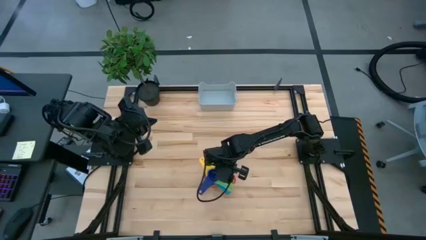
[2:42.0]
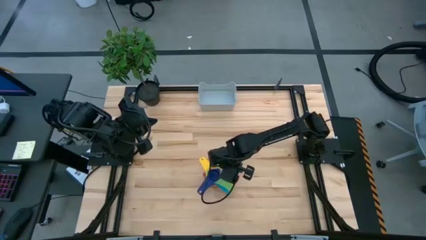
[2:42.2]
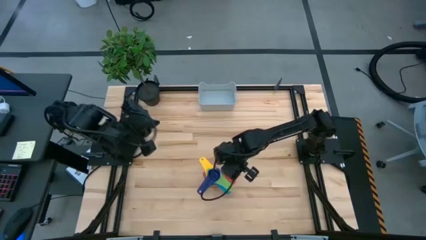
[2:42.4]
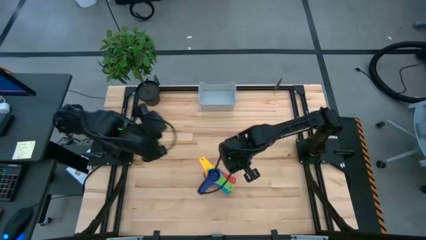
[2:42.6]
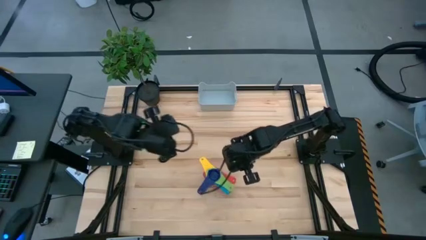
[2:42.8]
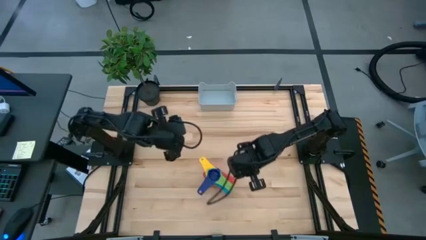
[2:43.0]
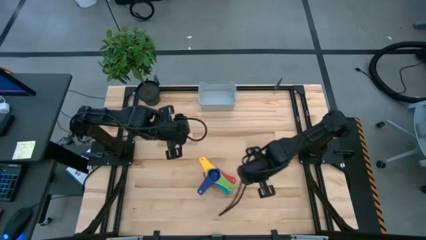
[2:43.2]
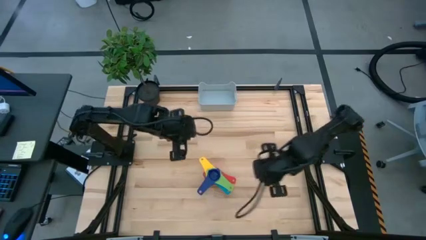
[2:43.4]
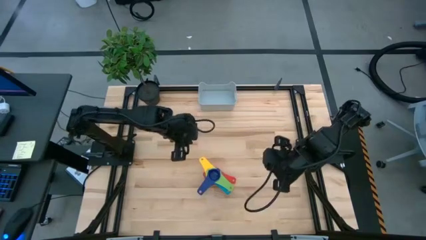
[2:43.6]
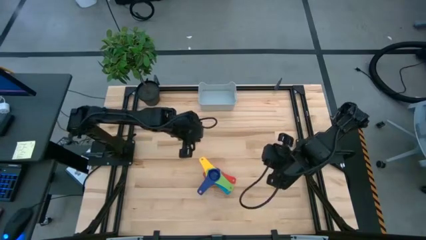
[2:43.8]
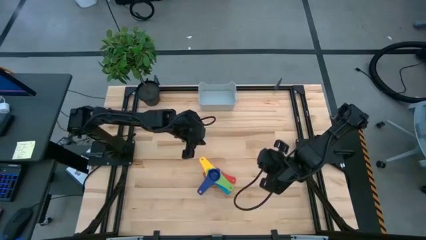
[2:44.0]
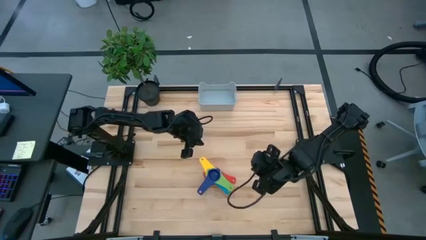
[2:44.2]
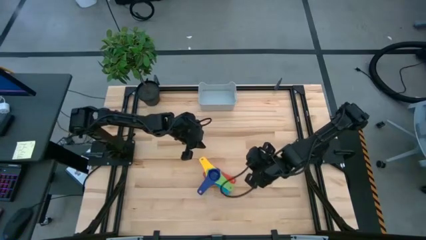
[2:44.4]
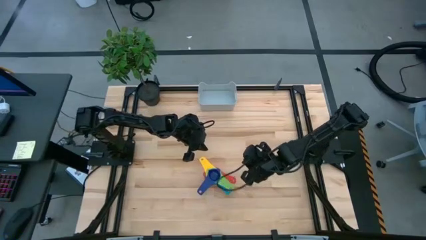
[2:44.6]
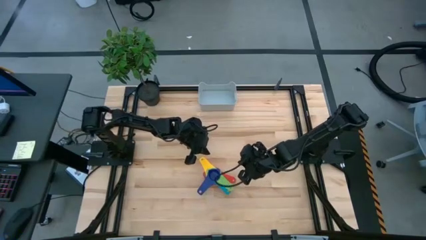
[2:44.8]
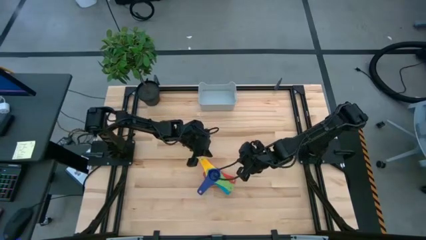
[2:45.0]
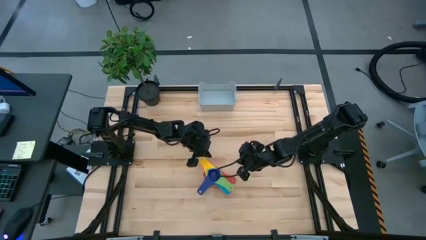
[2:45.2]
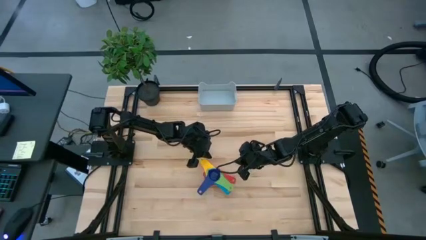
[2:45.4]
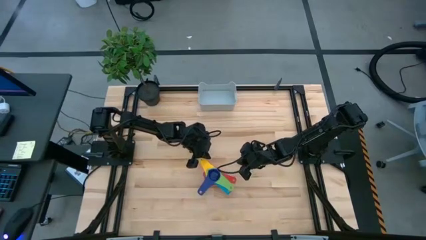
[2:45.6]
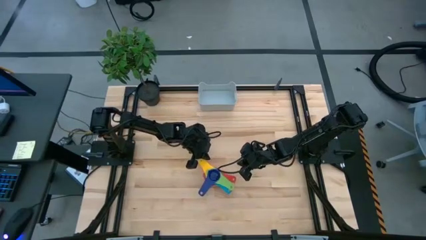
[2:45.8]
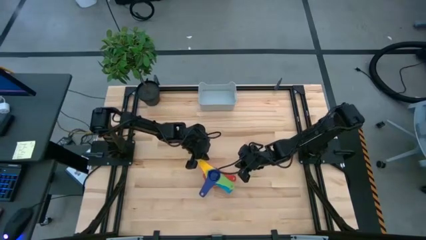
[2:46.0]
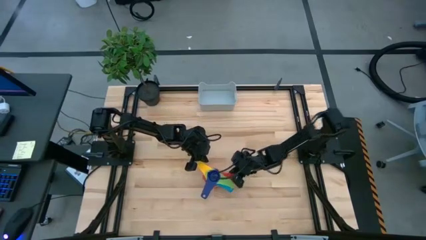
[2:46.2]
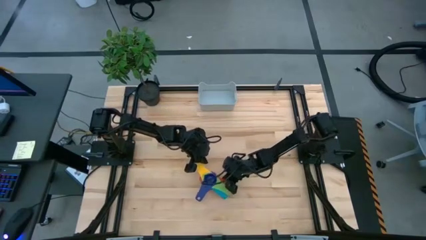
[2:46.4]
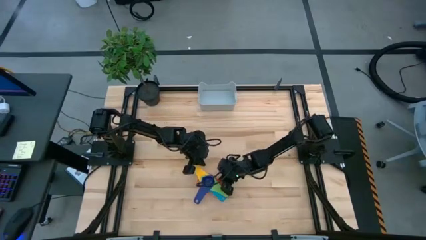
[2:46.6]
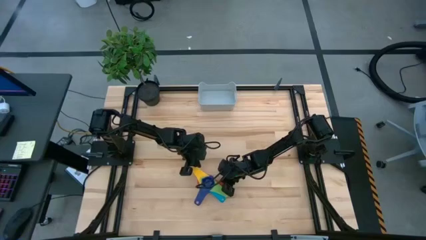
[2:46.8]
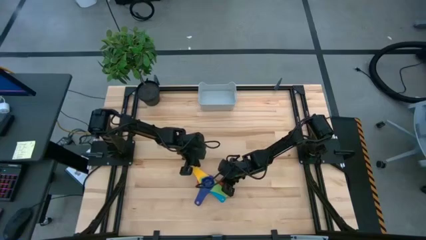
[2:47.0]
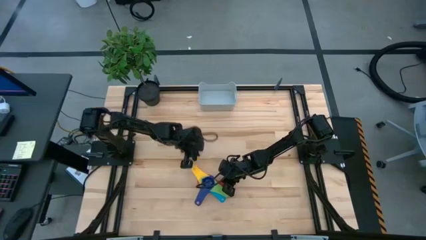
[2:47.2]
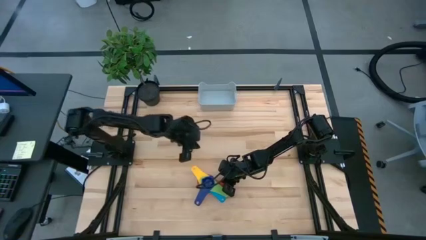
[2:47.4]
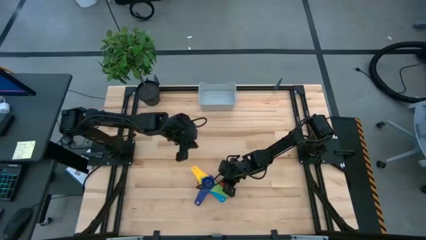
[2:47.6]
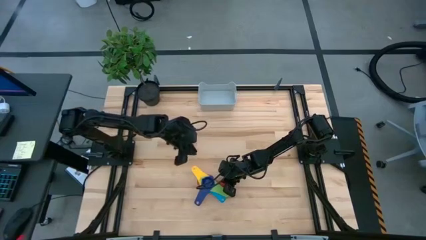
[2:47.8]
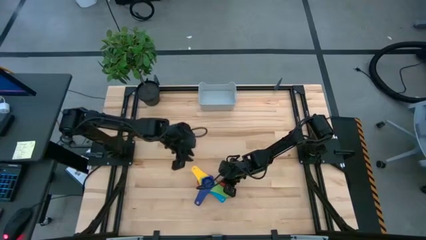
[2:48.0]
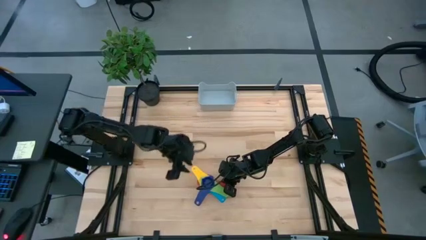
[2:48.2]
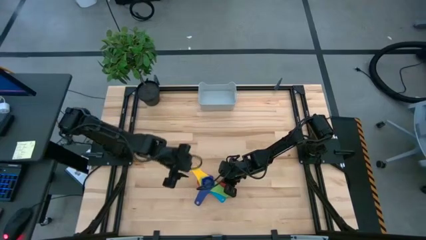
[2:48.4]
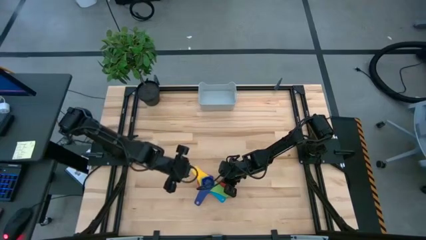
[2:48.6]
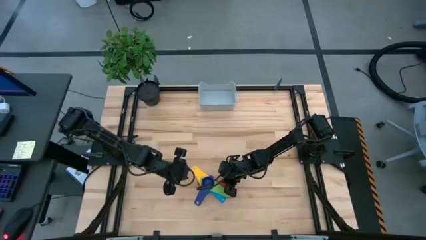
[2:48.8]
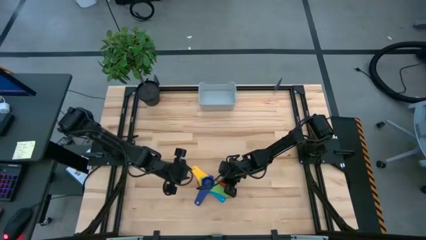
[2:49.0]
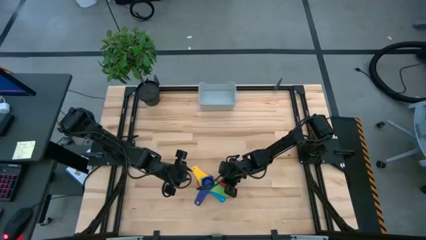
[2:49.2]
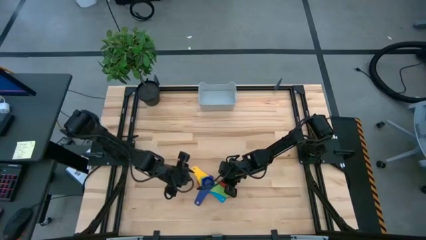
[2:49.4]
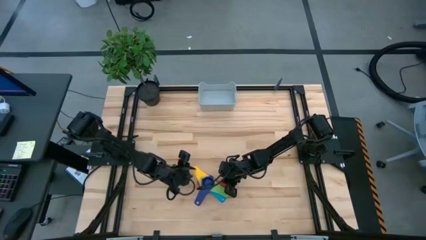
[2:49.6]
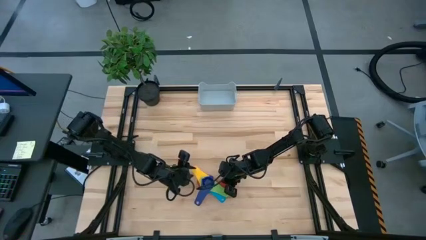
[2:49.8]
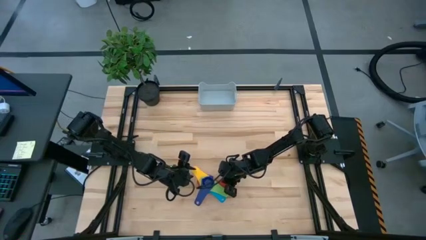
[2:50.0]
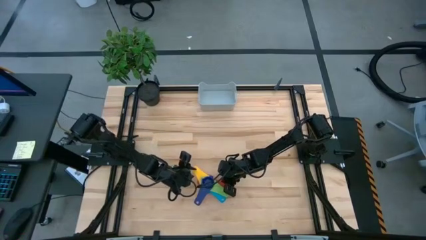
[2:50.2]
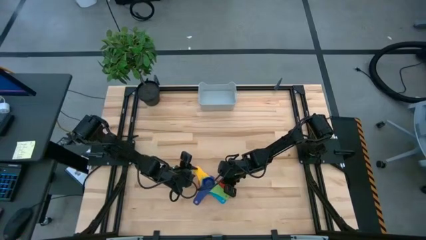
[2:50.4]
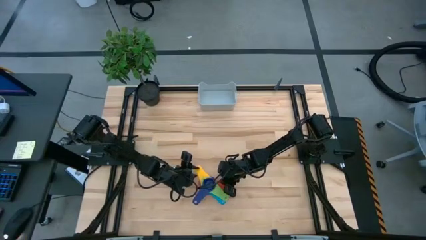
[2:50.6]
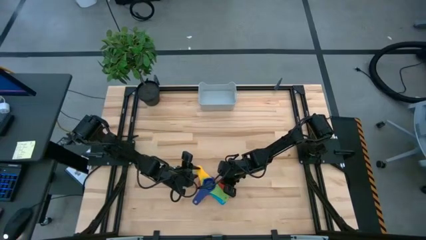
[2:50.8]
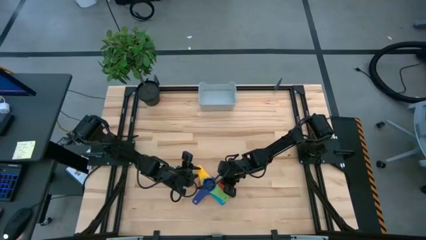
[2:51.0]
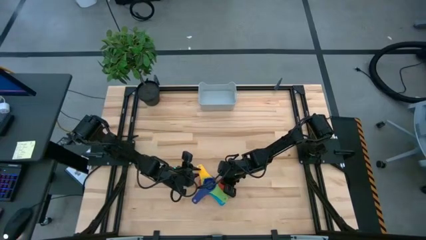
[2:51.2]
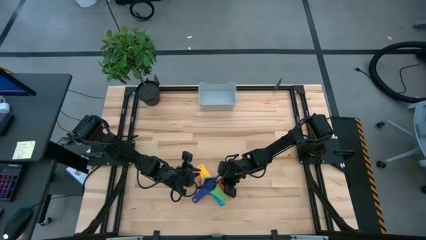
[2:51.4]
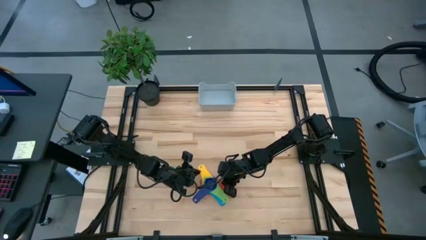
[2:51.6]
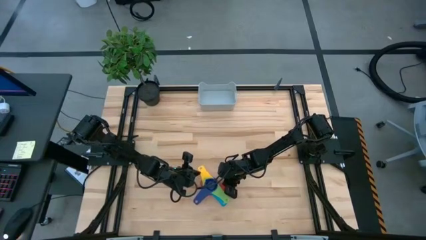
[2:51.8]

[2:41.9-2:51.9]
Task: Nest measuring cups in basket
Adjust the stacked measuring cups on the table

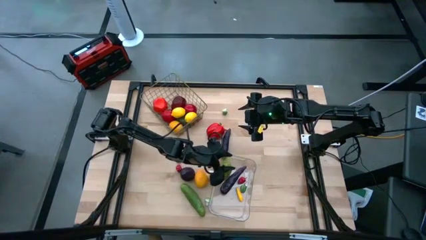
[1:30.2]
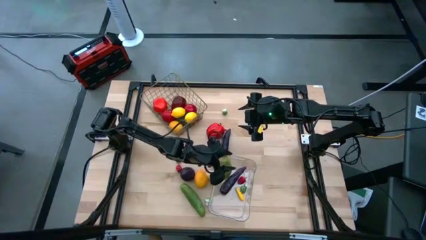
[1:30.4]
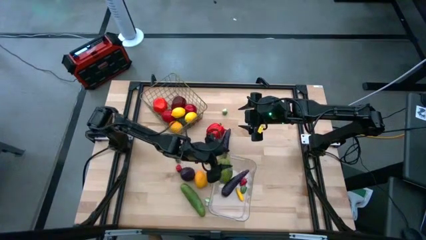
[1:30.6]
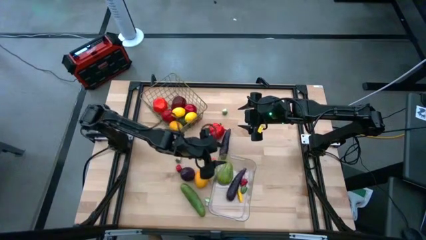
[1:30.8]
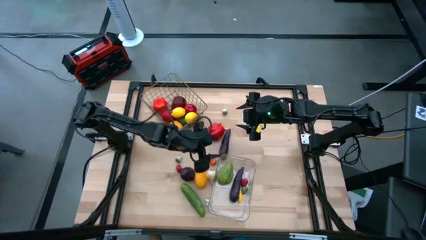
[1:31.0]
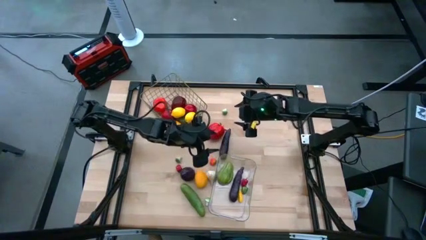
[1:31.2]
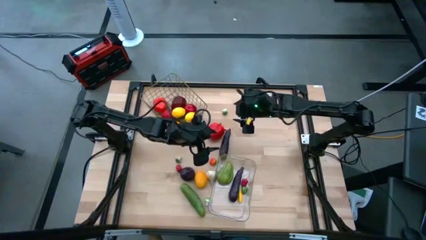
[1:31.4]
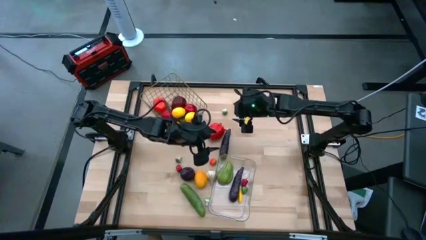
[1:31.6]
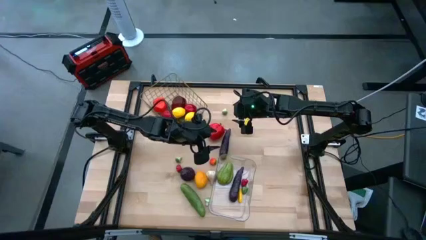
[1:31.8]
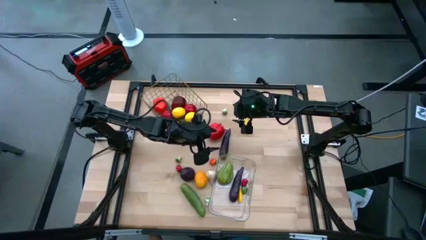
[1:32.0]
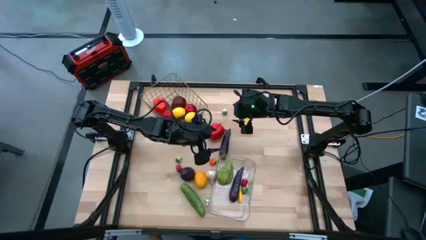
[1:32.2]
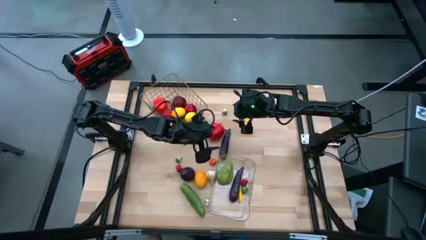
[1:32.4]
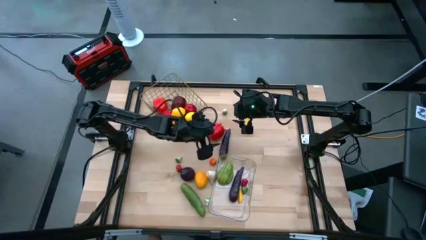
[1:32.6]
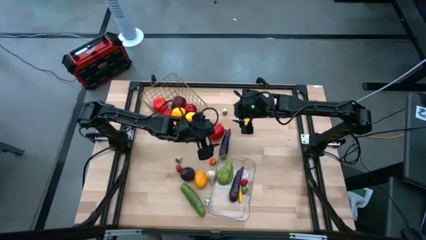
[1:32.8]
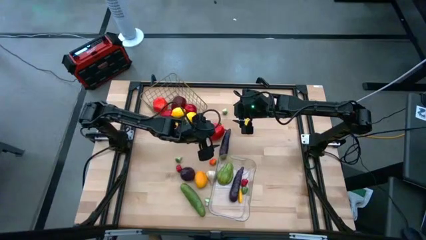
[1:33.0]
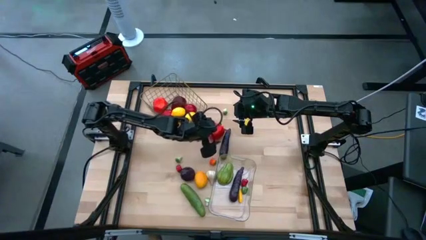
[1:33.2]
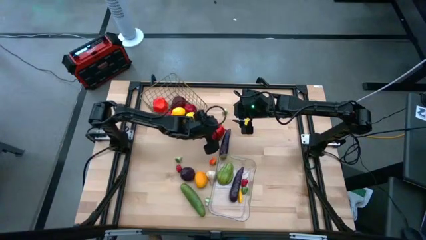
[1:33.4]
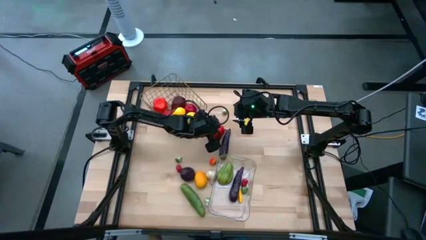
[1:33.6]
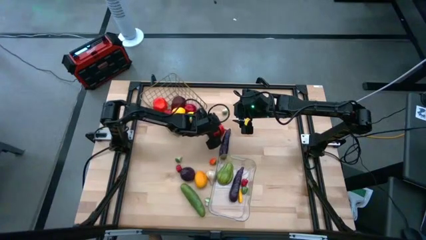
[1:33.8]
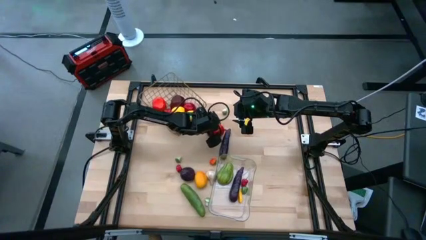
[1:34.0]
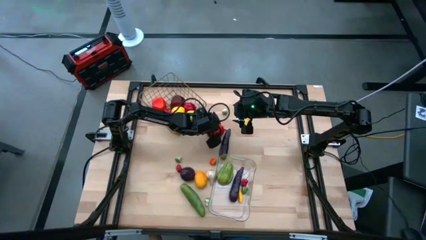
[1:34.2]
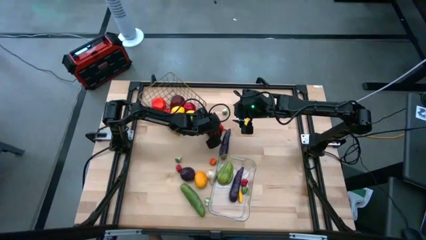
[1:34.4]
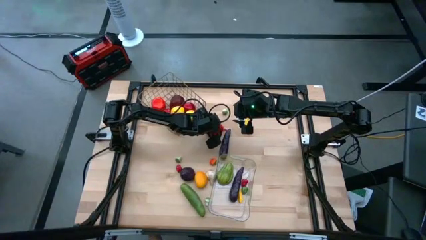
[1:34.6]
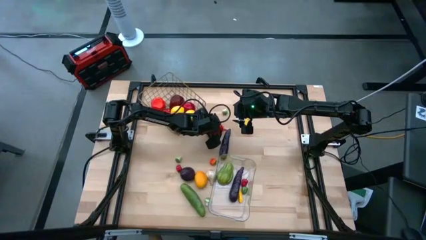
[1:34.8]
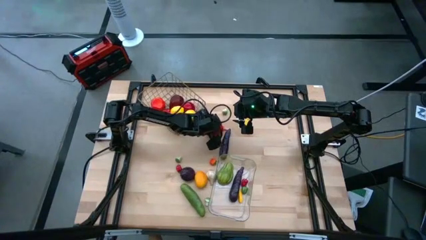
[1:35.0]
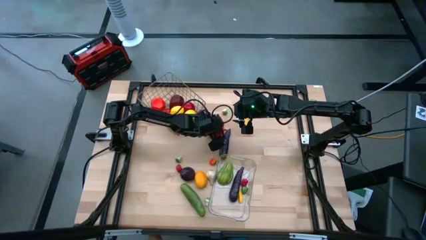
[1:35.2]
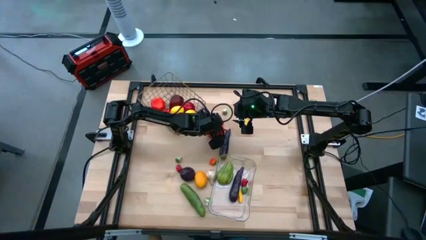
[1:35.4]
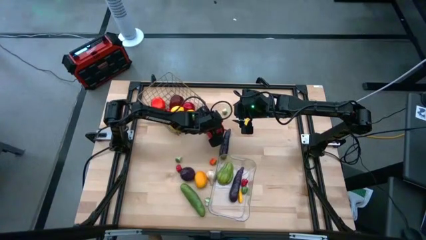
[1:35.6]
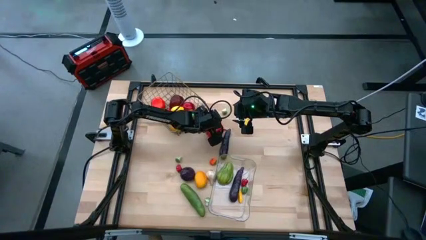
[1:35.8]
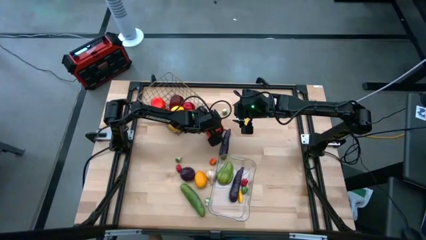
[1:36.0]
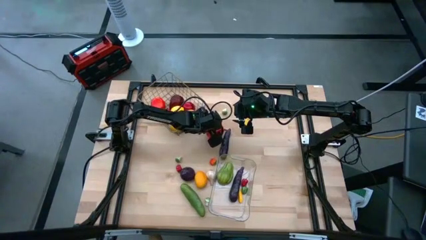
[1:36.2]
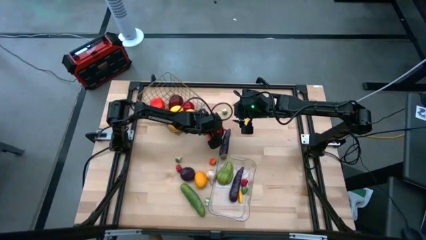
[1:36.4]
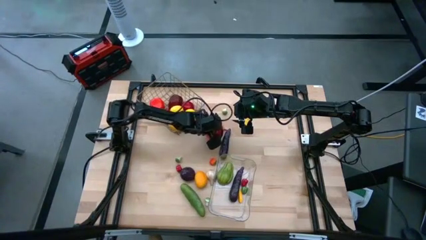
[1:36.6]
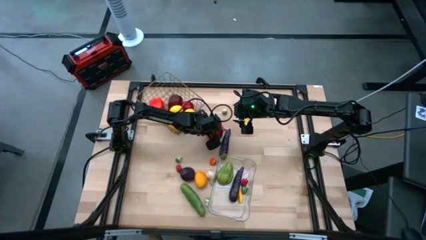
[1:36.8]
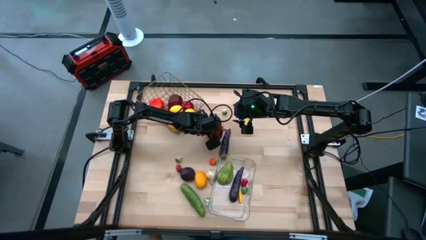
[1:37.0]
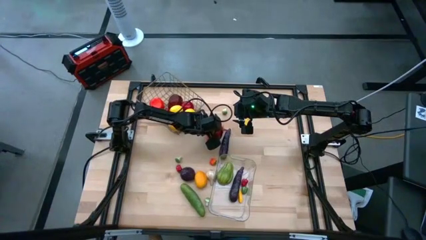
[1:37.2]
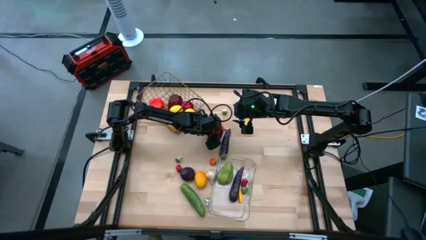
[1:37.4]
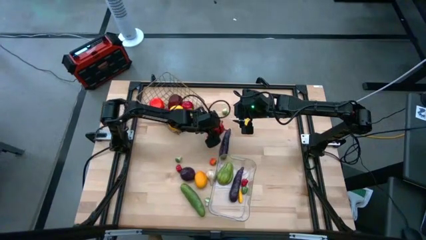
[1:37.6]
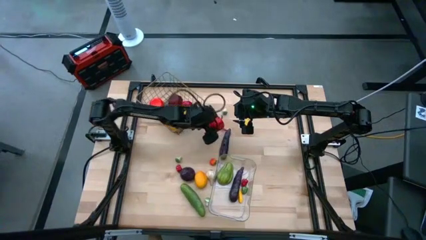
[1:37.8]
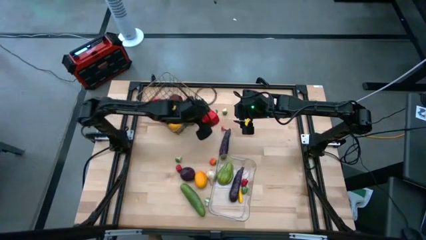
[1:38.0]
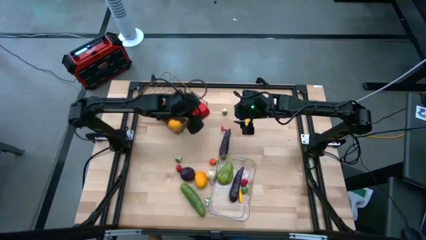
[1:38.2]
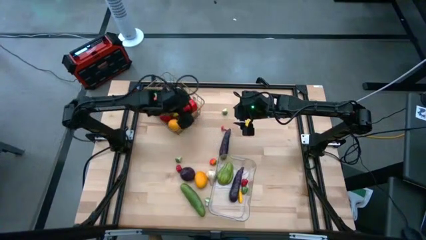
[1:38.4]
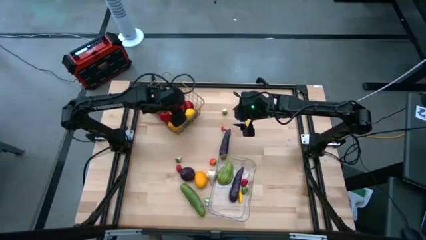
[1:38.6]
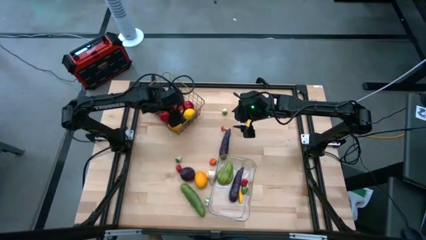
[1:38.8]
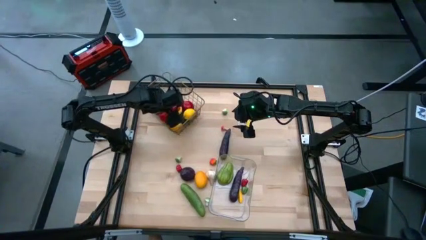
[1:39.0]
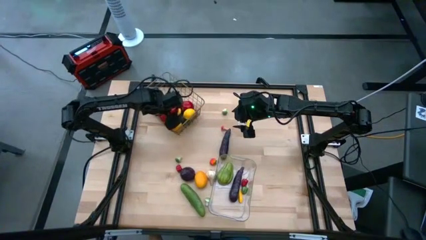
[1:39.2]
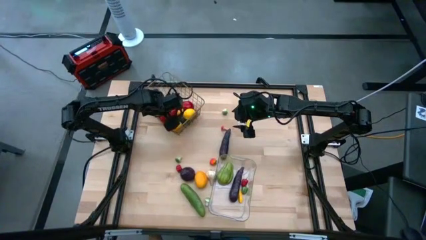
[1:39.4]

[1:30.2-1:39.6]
Task: Sort produce into baskets
Put the red bell pepper into the wire basket
